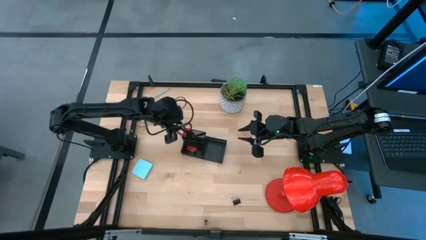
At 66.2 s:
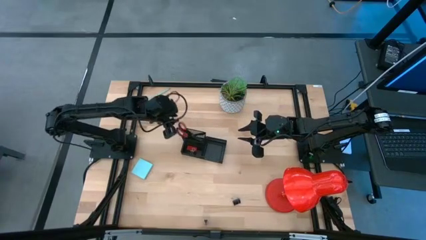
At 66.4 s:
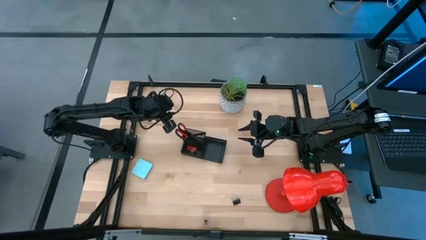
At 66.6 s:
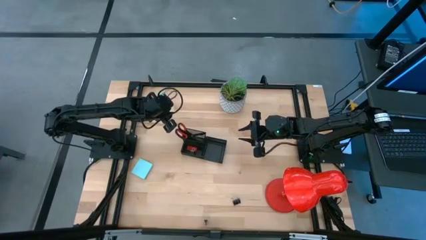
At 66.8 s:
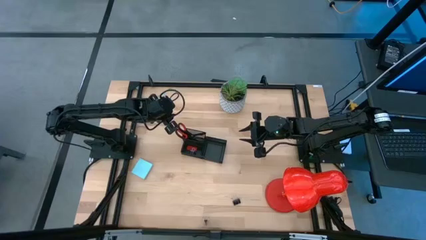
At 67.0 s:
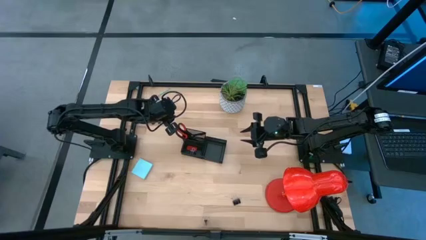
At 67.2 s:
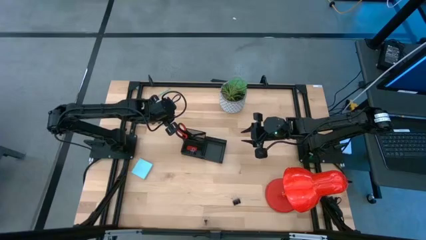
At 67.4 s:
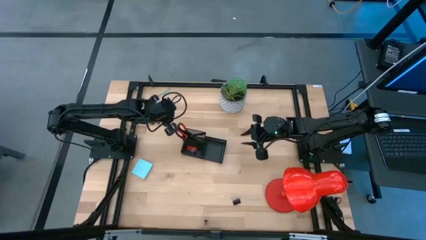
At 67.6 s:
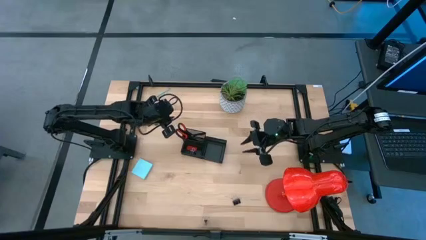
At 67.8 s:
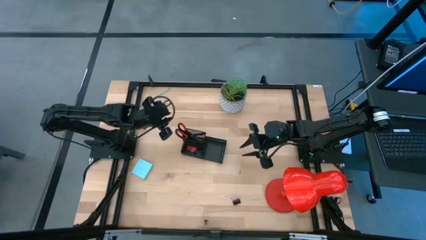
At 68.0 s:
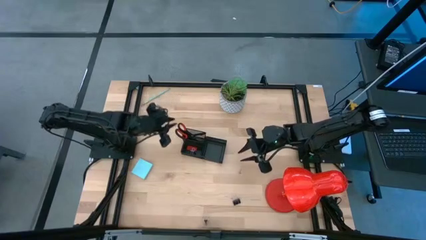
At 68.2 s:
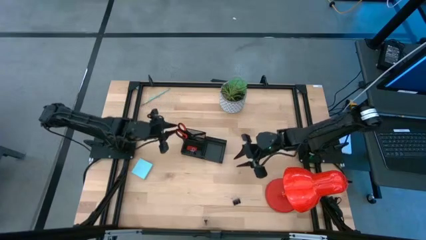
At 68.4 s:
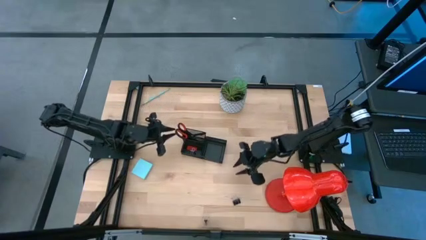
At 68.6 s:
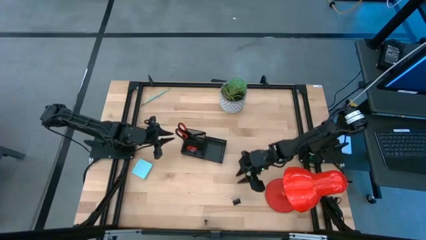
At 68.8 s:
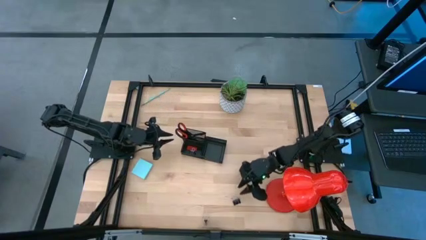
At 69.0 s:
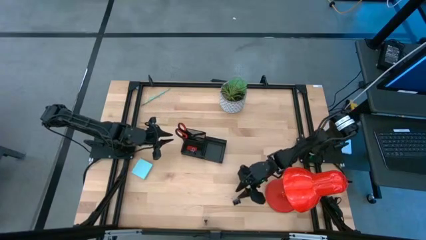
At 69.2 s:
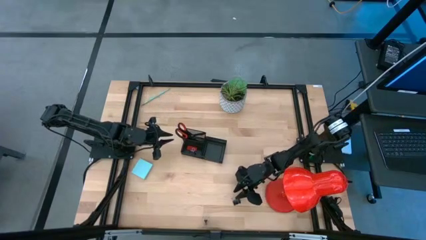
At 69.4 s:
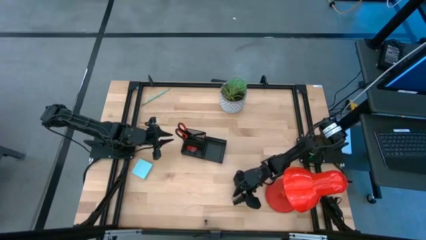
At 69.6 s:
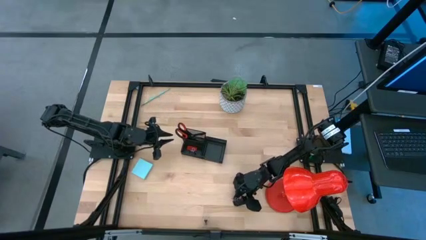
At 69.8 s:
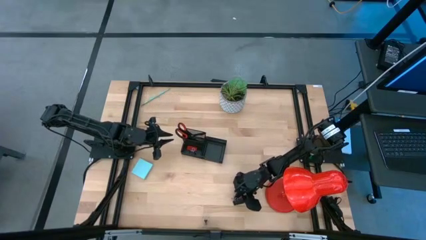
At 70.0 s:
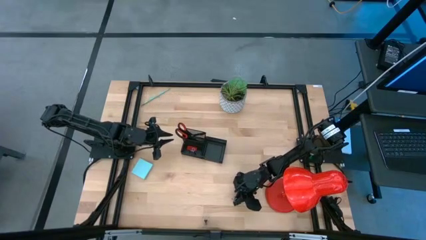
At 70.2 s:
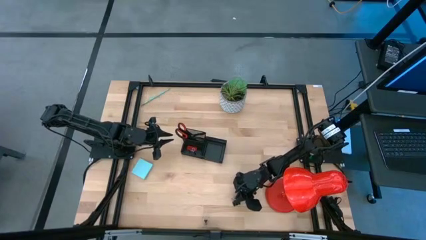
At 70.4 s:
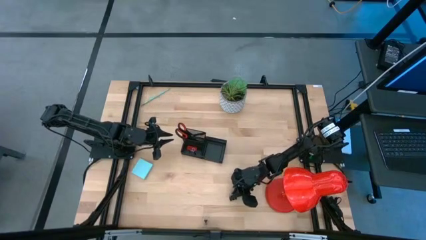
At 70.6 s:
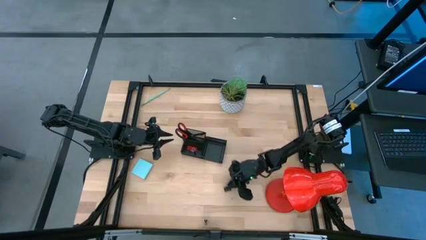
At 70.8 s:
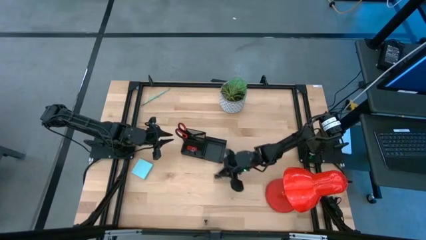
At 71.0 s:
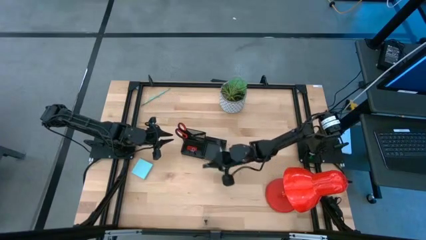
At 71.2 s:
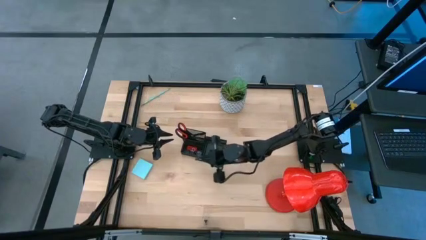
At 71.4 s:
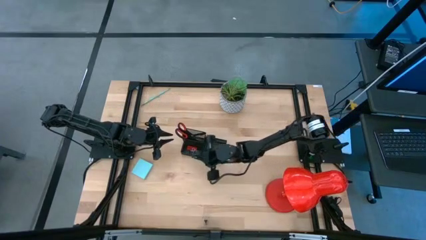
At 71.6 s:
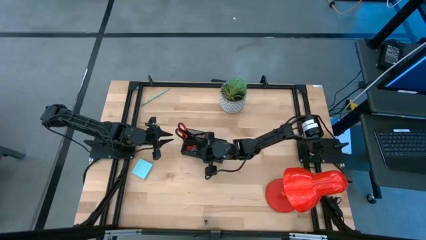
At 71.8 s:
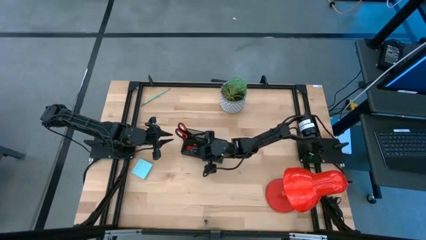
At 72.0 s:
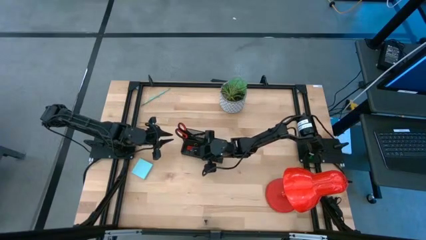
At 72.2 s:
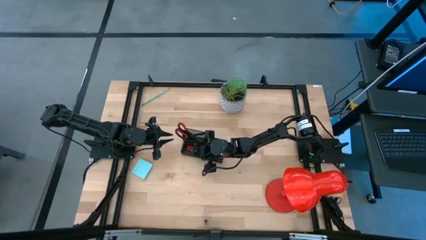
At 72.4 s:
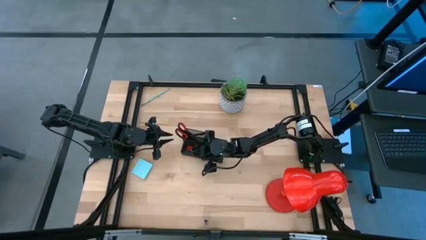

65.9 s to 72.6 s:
Task: Pick and place office supplies into organizer
Put the top binder clip into the bottom left section of the desk organizer

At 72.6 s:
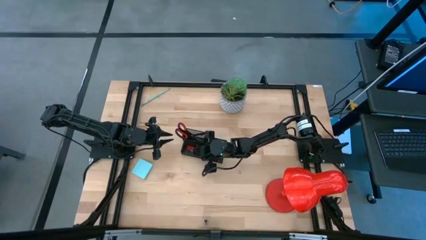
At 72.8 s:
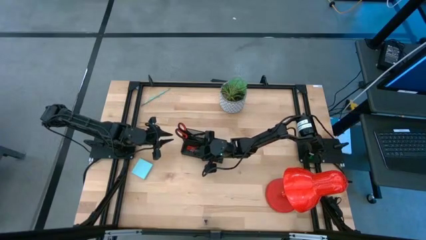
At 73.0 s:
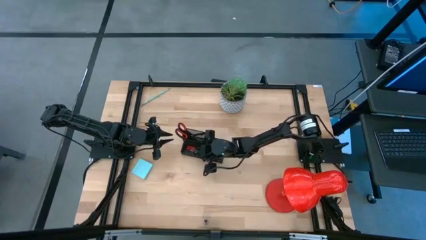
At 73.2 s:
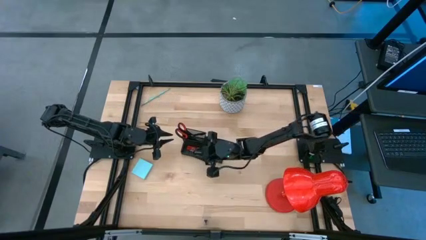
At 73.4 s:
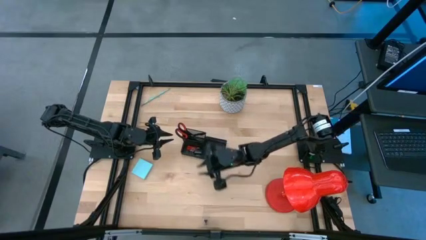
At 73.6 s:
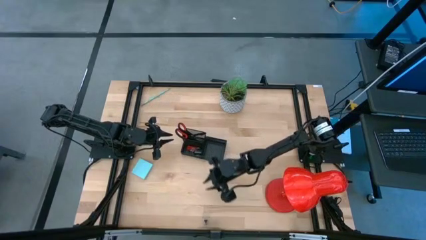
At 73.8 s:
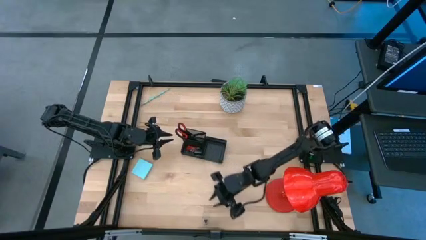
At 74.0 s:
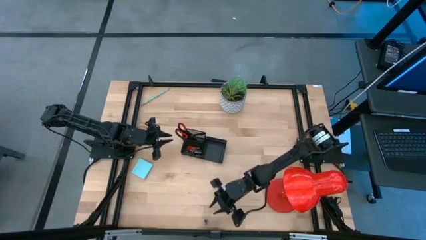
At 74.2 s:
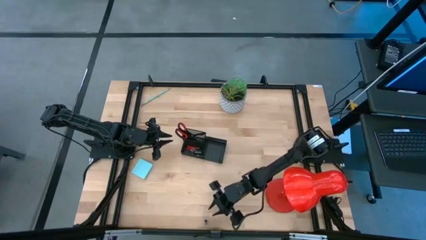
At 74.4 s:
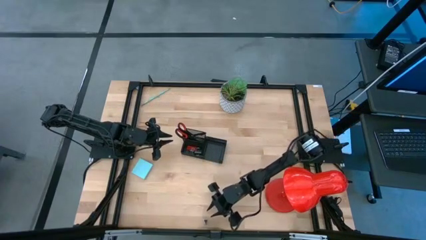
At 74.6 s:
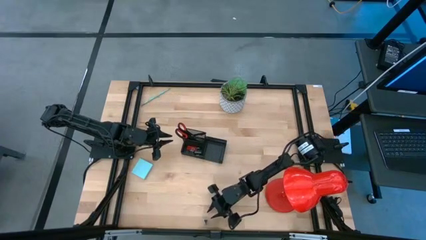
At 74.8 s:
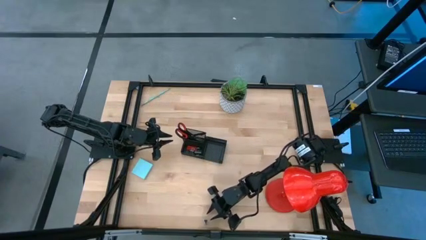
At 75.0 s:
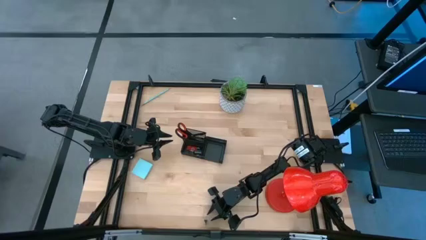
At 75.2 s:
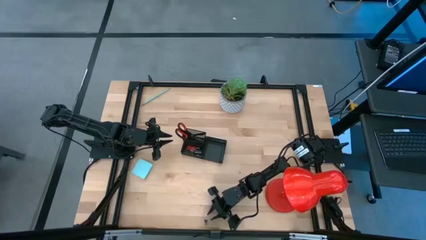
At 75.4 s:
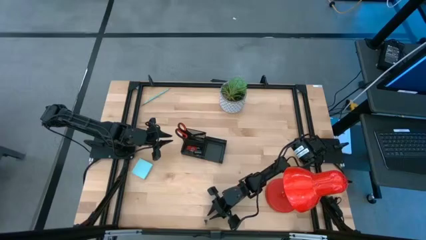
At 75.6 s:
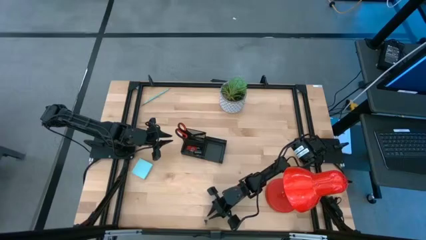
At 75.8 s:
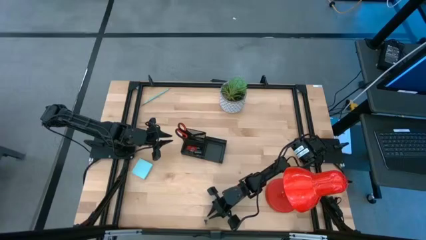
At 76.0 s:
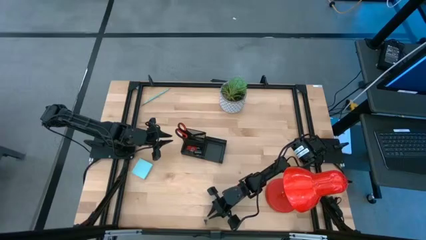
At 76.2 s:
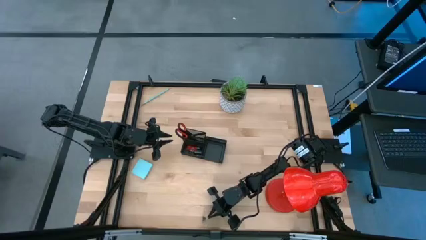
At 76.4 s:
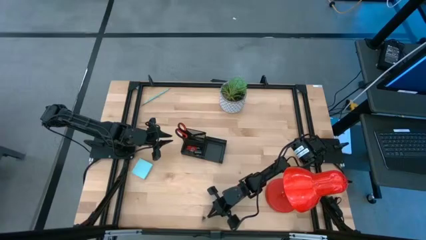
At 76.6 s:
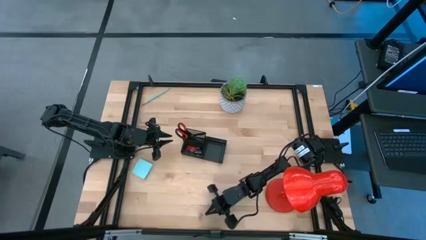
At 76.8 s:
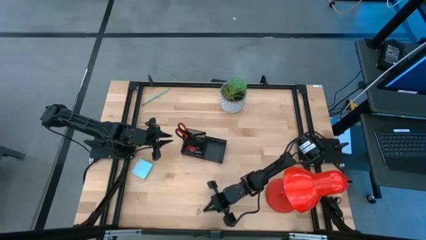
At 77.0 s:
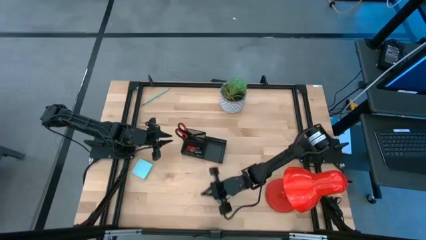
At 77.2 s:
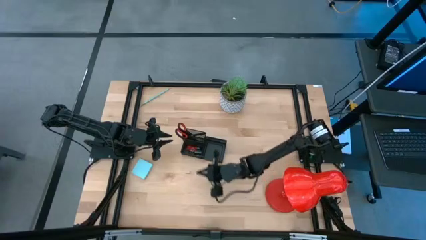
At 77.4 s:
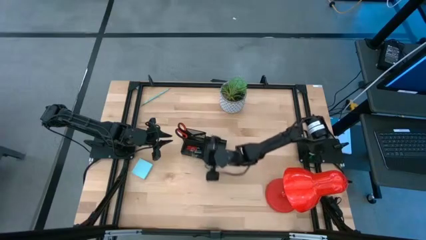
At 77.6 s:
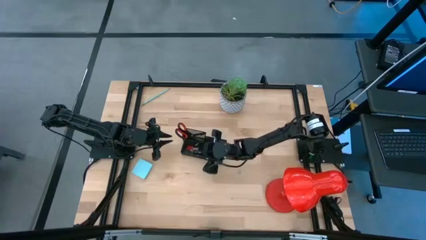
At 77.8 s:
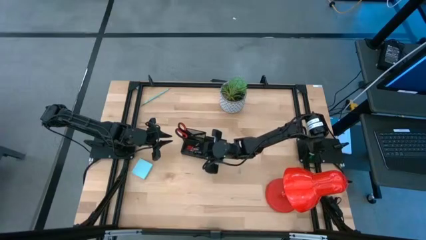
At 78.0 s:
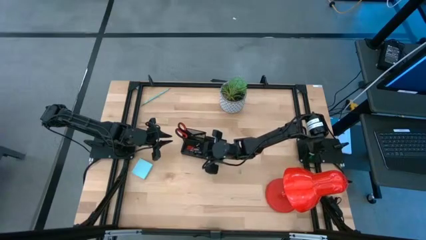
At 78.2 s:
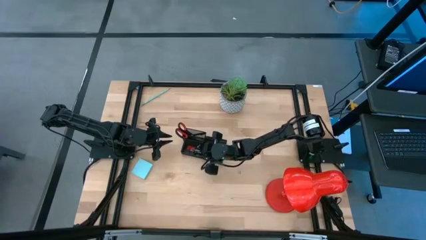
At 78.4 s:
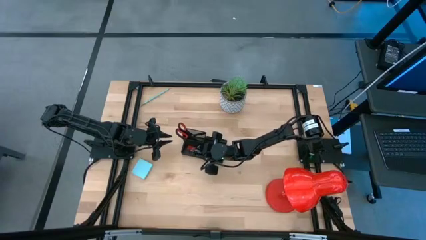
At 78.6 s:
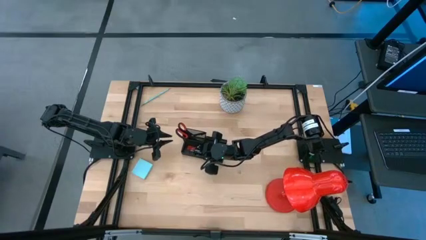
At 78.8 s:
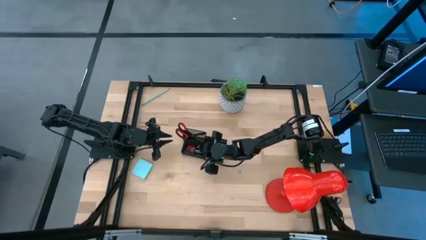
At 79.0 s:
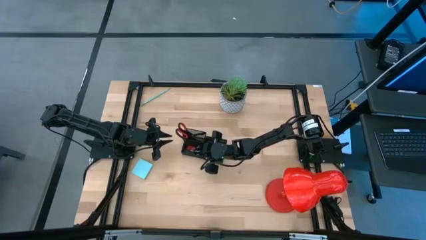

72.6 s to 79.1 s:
Put the binder clip into the bottom left section of the desk organizer

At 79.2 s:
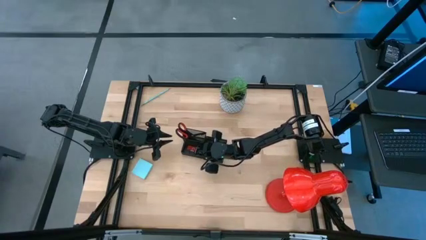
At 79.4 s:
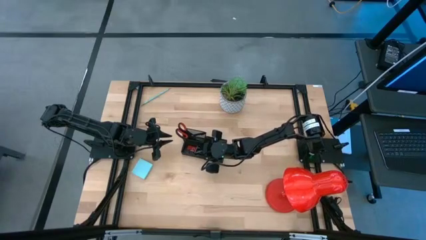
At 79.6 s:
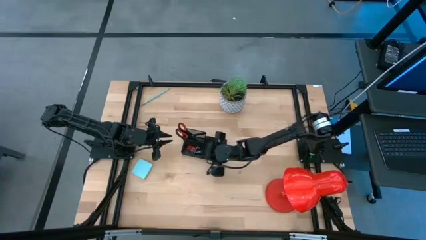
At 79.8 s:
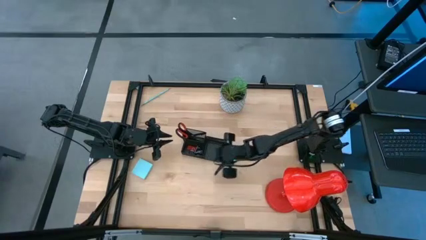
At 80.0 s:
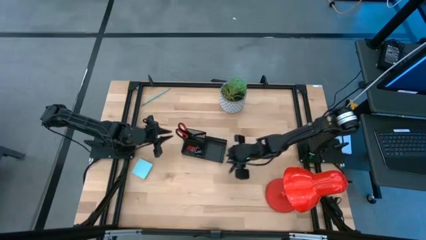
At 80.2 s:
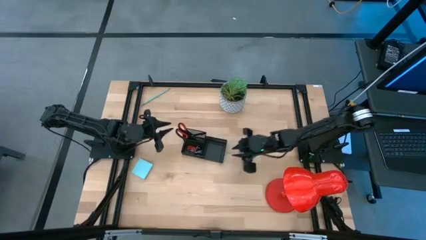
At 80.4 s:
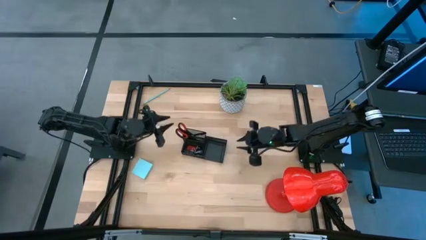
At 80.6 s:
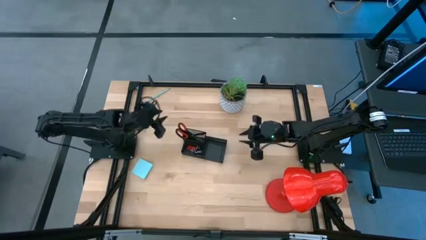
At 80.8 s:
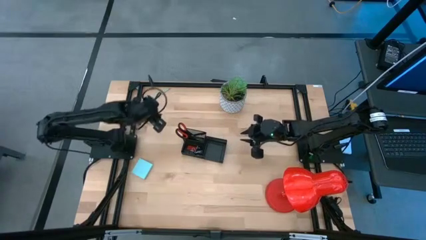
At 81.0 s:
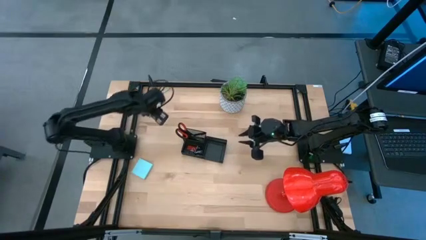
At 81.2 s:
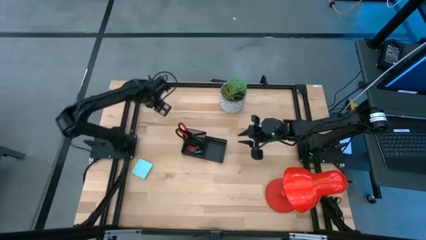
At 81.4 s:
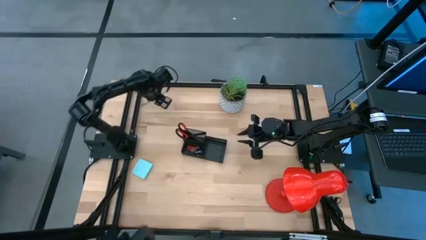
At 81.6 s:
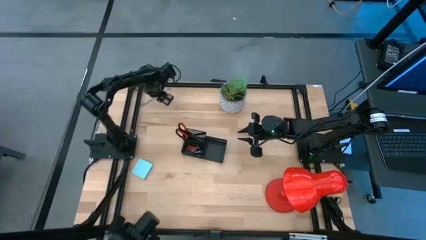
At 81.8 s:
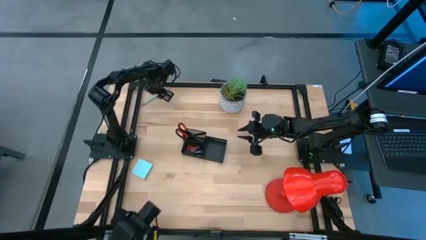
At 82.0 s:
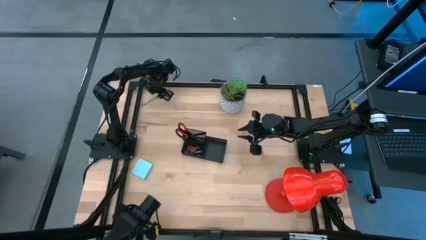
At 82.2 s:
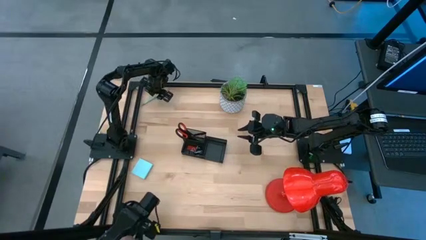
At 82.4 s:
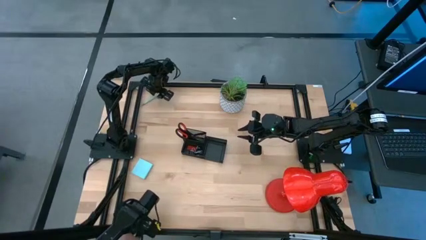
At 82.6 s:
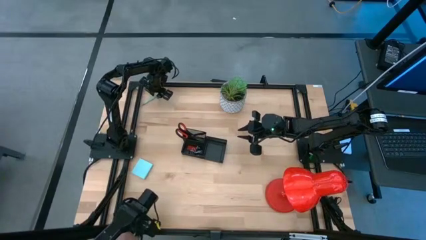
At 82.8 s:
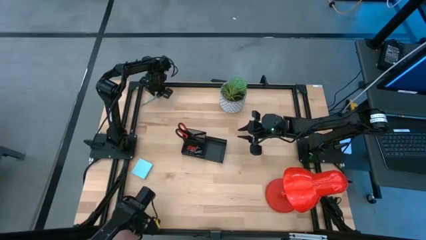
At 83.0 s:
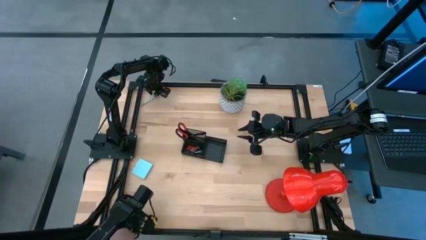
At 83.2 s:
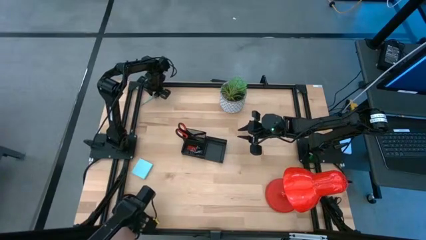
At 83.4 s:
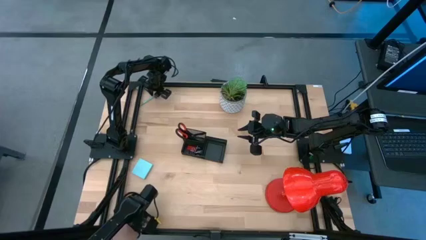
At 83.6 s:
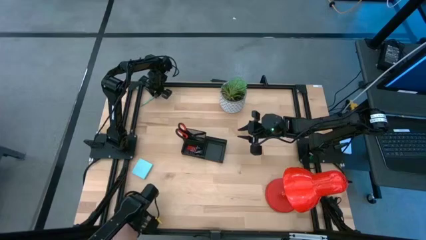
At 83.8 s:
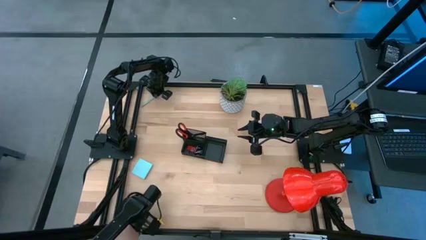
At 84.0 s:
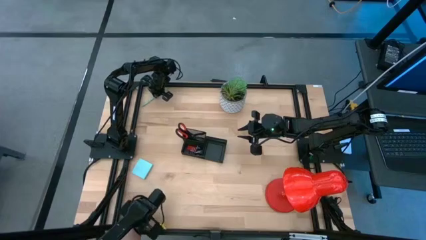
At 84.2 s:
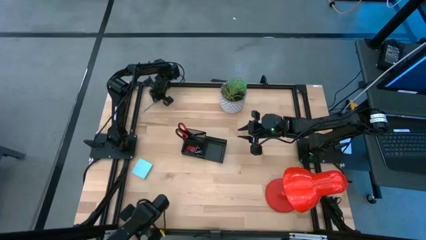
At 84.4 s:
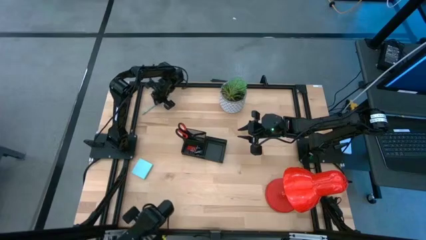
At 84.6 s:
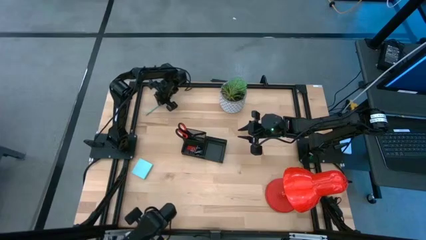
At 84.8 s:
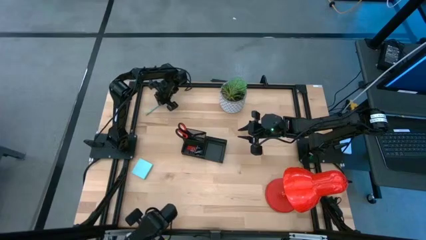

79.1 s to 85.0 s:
Put the pencil into the top left section of the desk organizer
